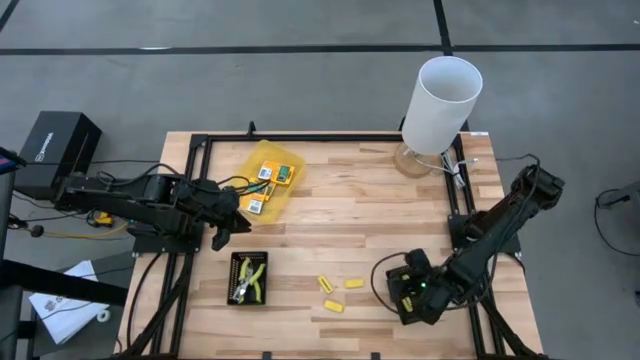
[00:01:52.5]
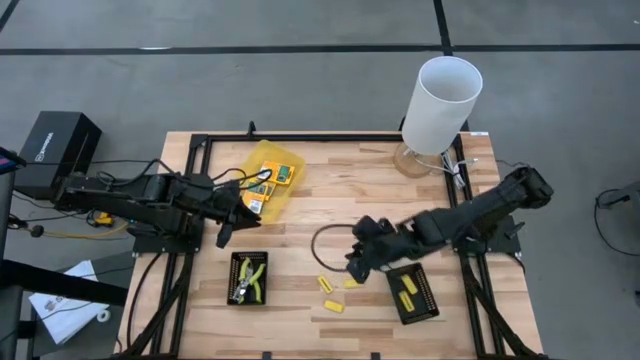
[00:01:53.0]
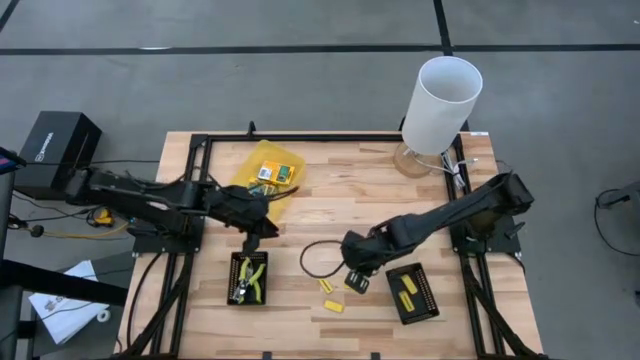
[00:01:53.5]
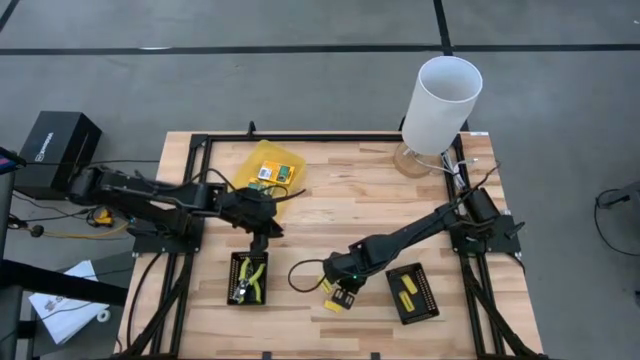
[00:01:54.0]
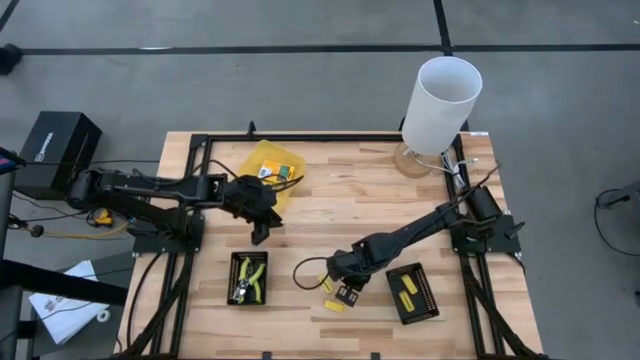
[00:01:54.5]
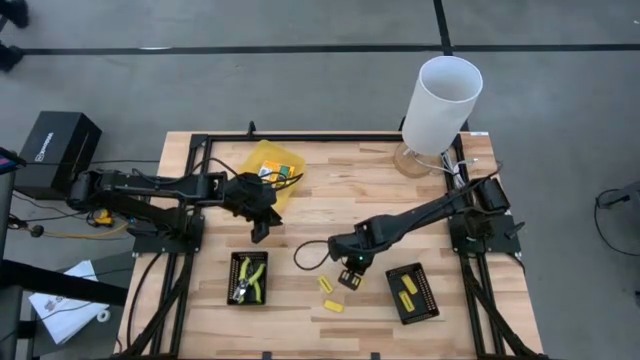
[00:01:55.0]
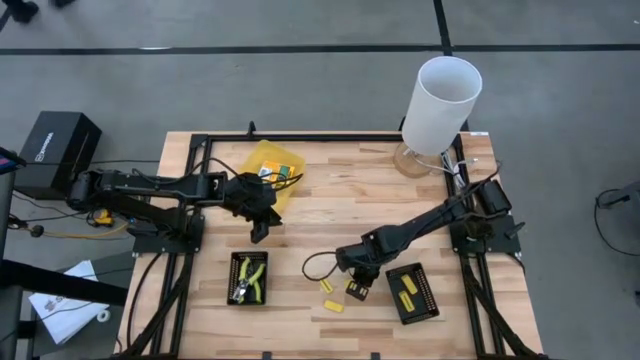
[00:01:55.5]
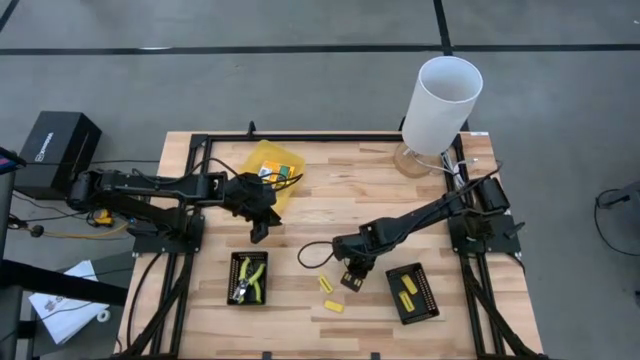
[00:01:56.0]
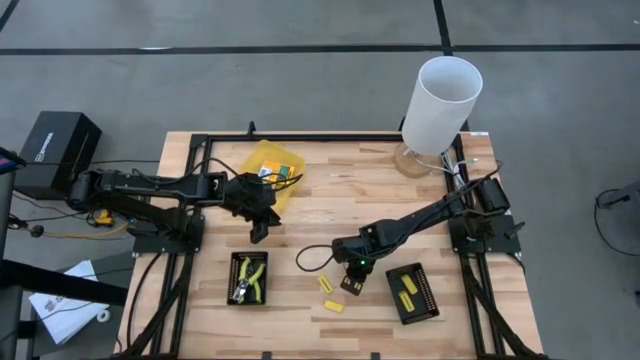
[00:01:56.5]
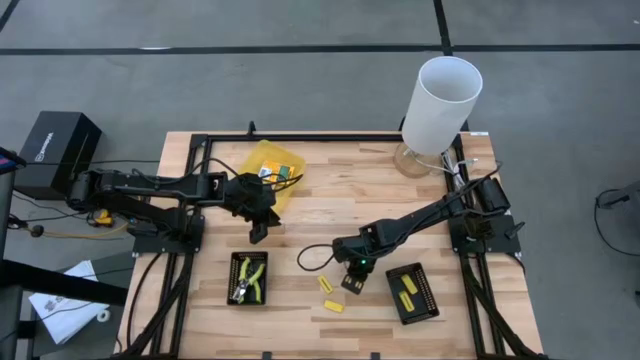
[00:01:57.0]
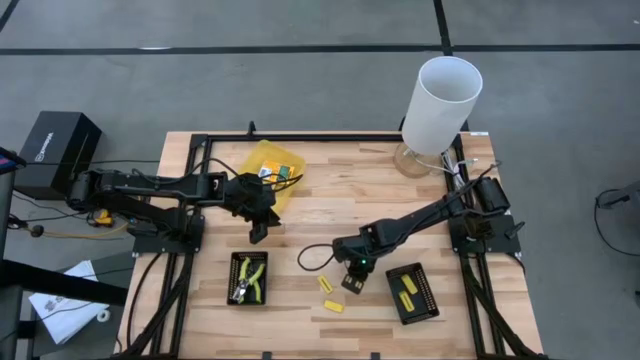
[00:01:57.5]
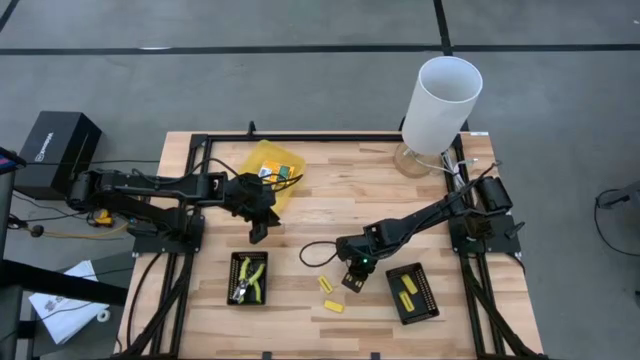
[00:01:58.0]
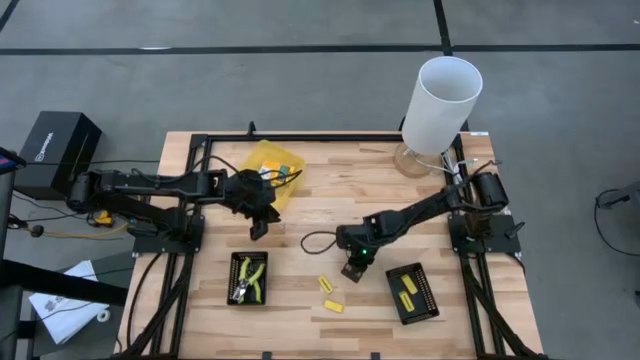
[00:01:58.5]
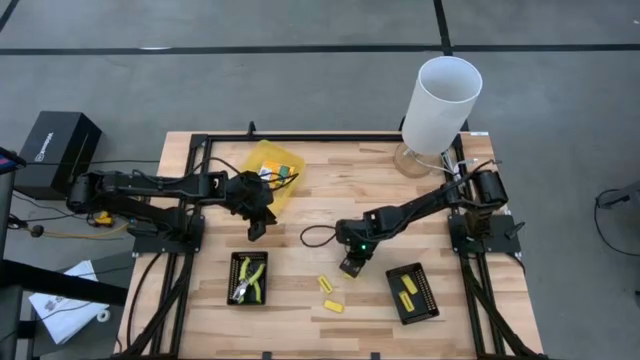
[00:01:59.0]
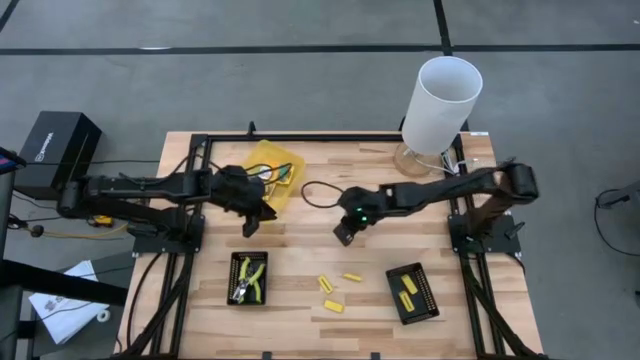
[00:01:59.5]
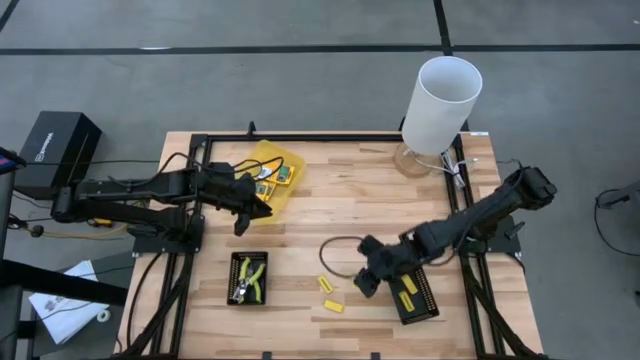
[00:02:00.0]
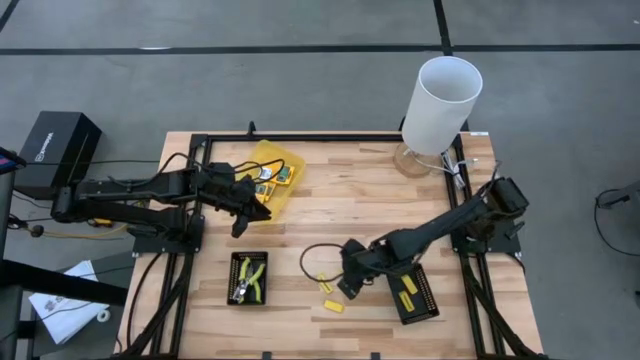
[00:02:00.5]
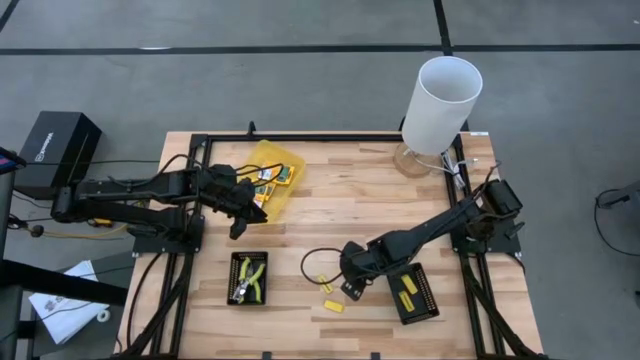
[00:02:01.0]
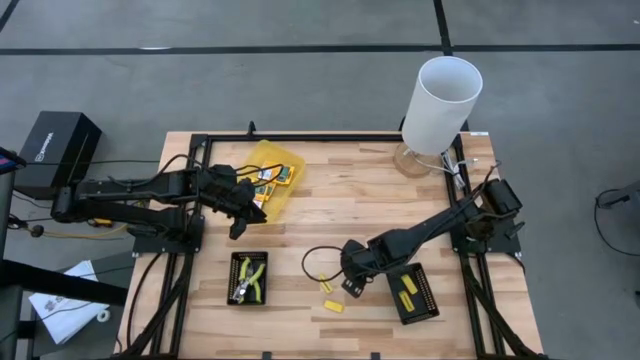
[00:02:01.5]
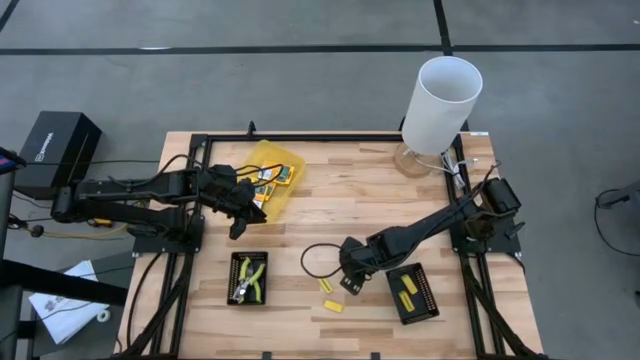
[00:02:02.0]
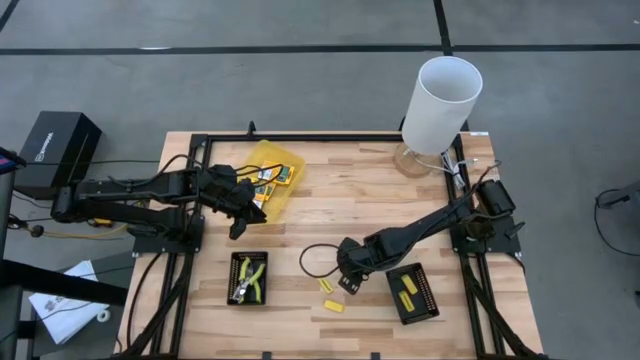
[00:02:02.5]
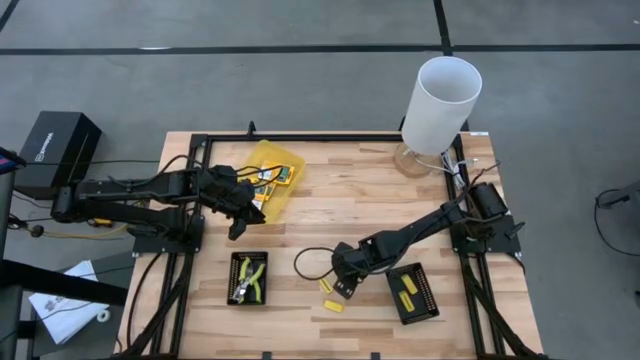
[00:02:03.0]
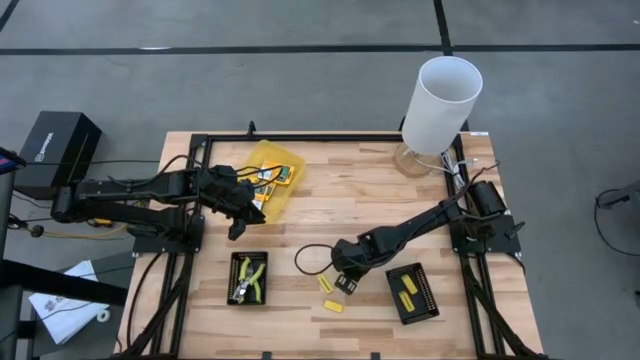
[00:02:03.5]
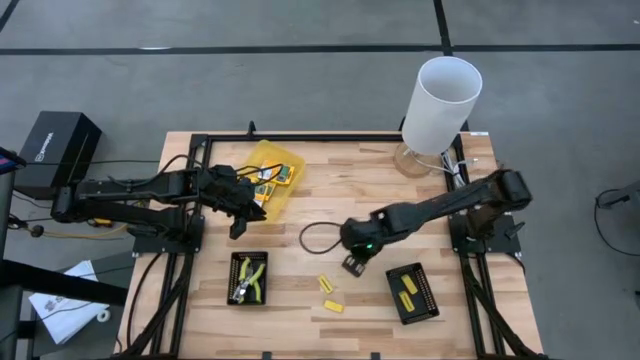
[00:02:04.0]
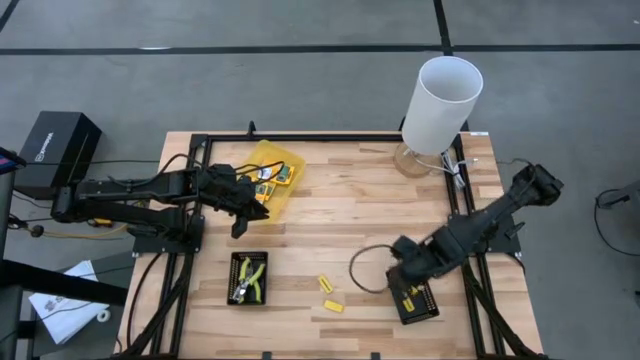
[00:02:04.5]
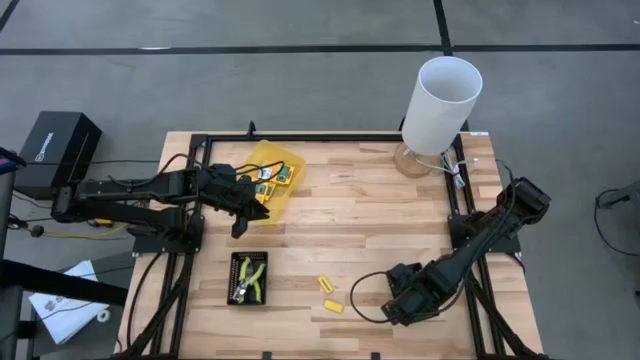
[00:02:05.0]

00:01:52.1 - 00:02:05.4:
Task: Pick & Place School Supplies
Put the yellow eraser into the right black bin

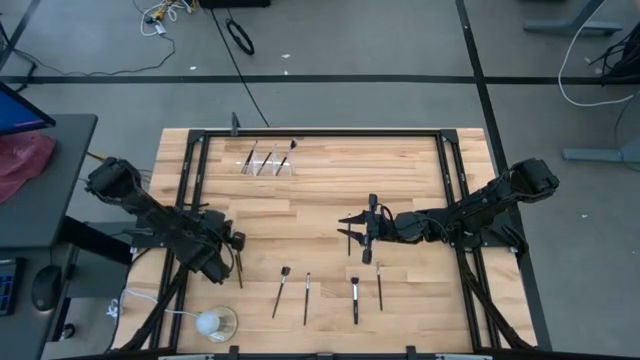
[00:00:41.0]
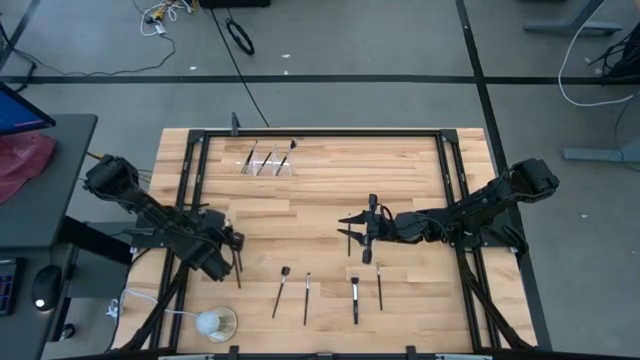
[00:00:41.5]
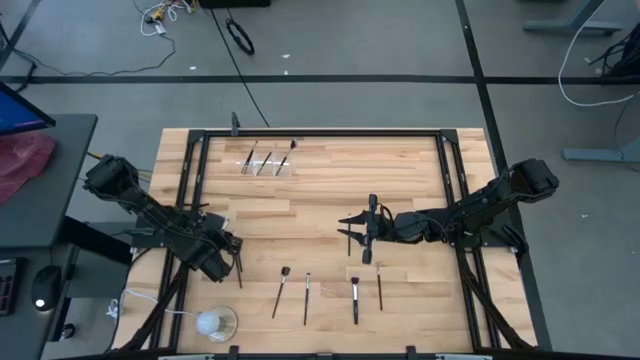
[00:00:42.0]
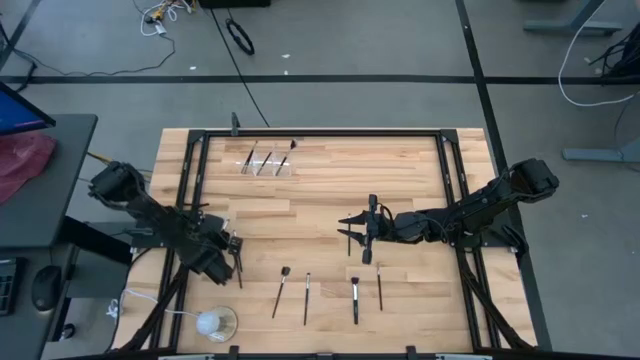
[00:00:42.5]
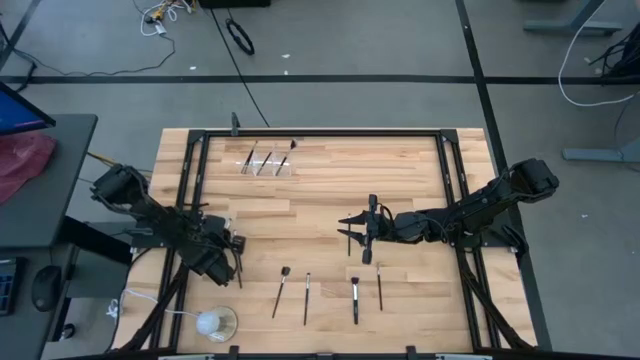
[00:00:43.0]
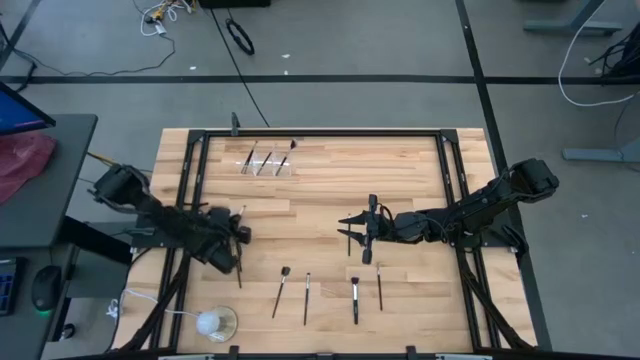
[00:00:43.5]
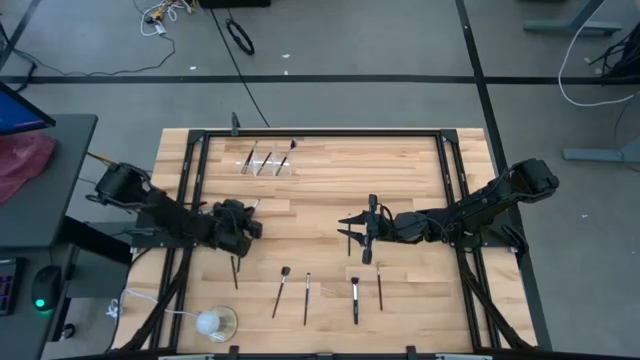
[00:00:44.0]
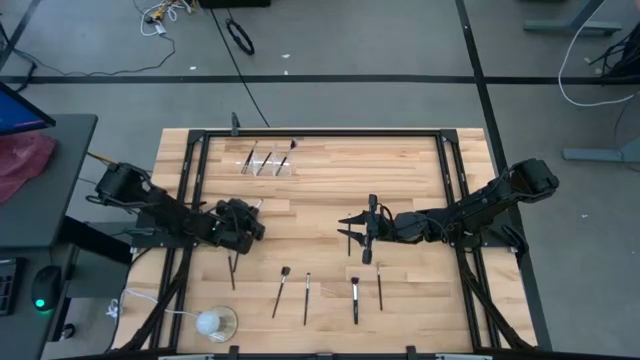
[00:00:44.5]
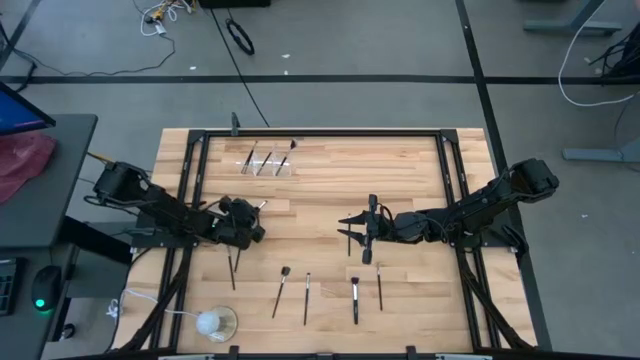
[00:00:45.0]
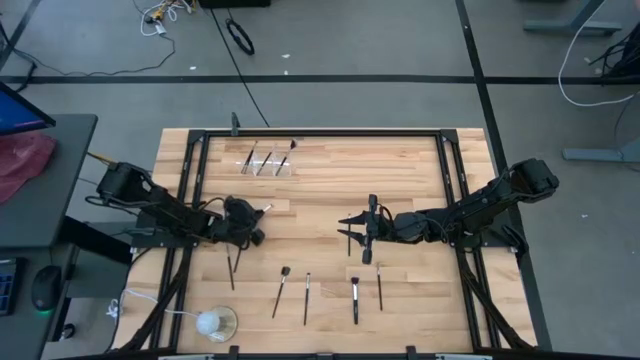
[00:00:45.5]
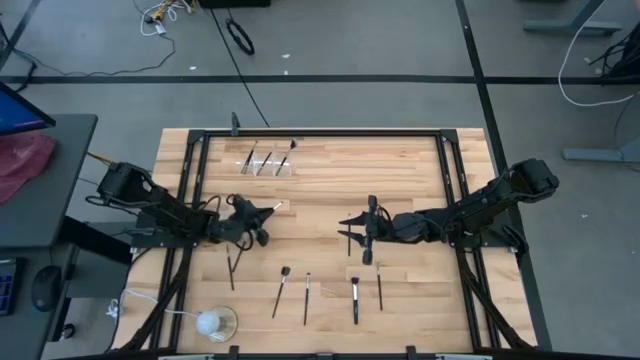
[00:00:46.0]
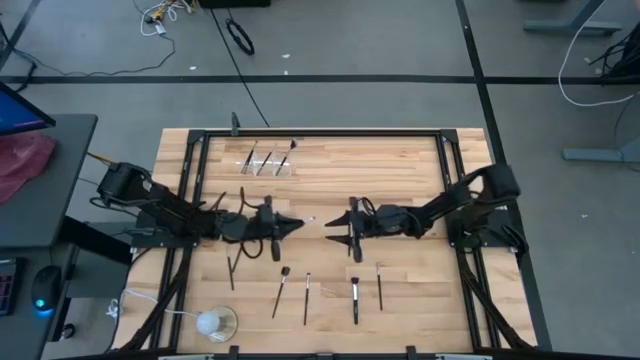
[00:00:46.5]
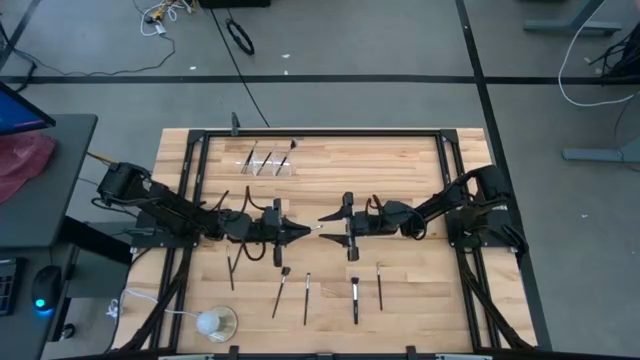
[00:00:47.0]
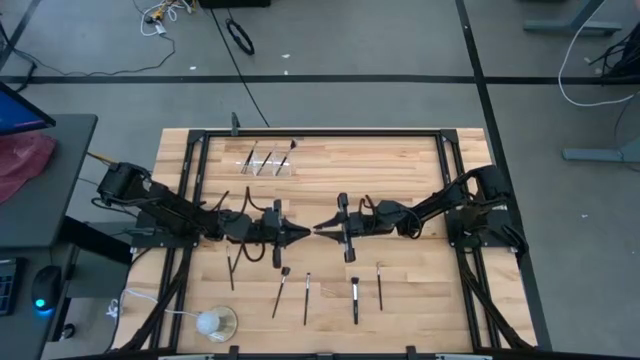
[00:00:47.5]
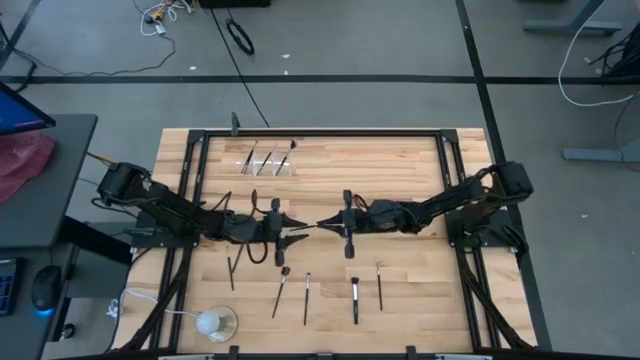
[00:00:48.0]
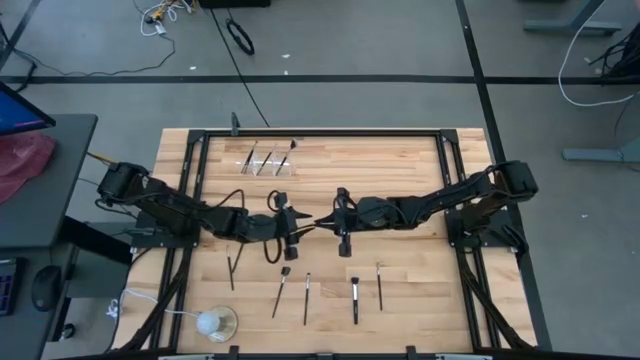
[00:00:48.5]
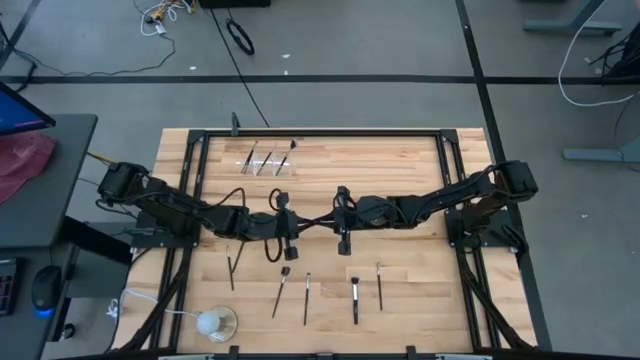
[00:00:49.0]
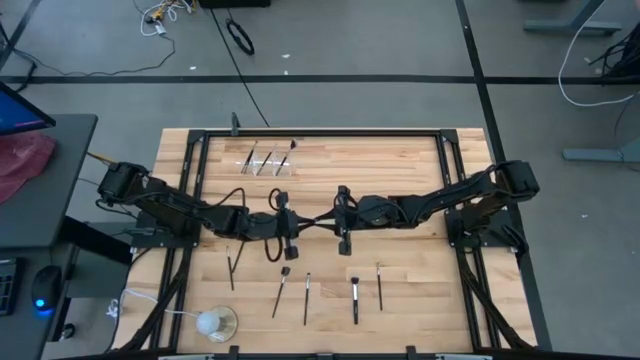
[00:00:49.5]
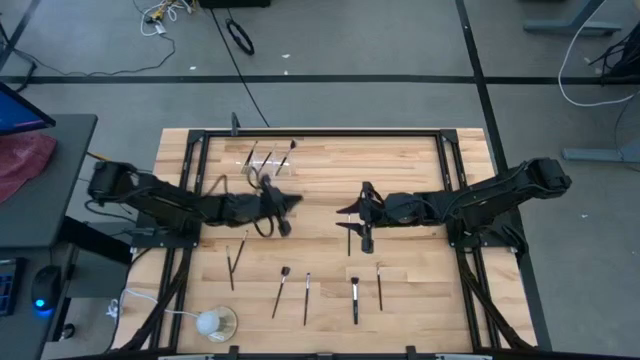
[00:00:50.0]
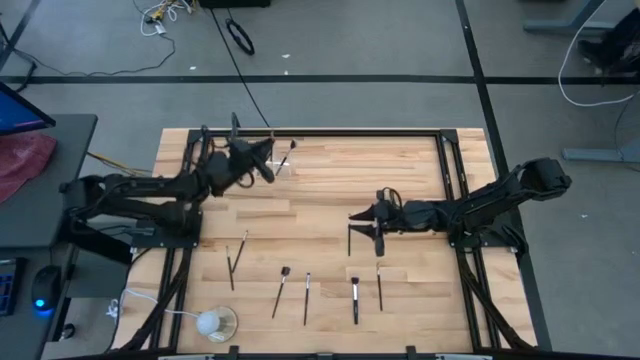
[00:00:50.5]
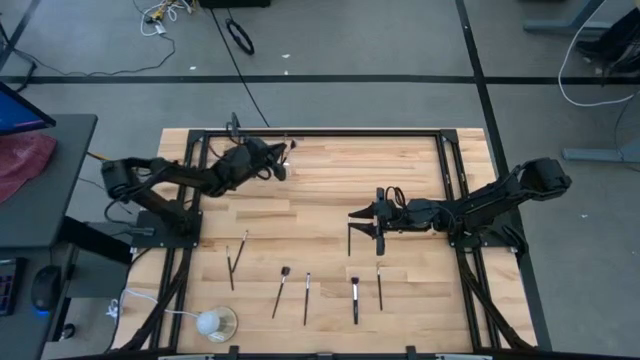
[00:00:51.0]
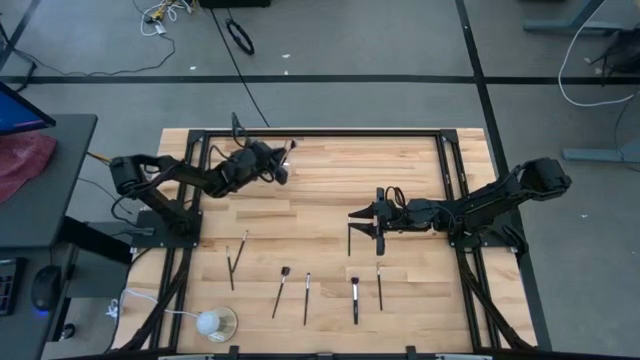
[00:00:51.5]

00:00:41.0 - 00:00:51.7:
Task: Put items in baskets/containers
Put the eyeshadow brush into the right section of the transparent organizer
